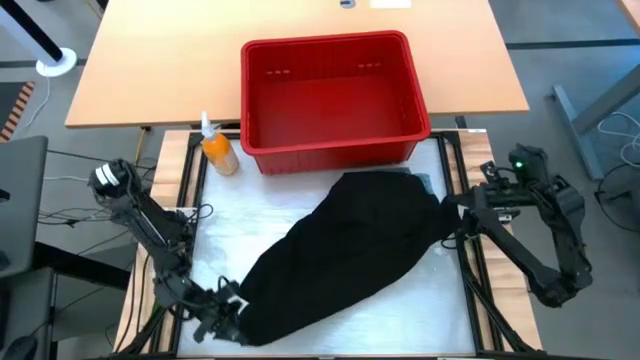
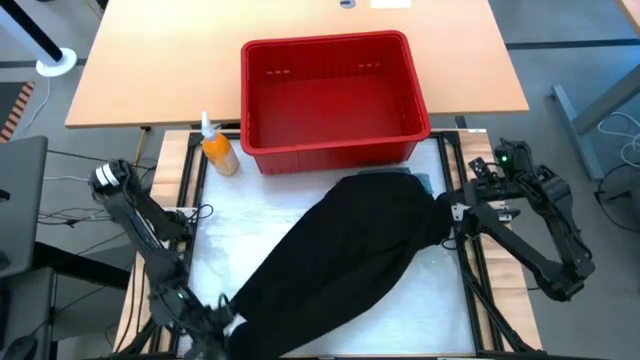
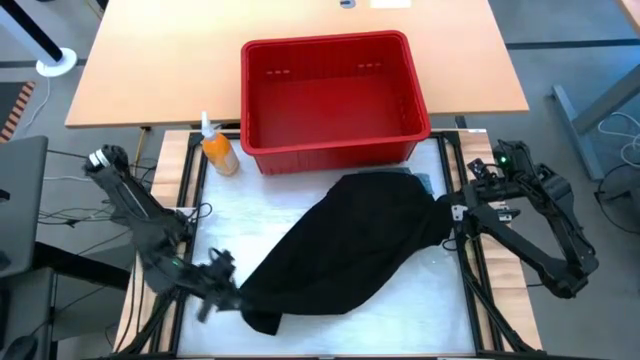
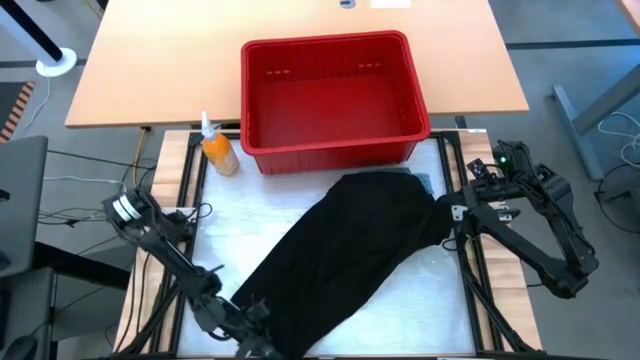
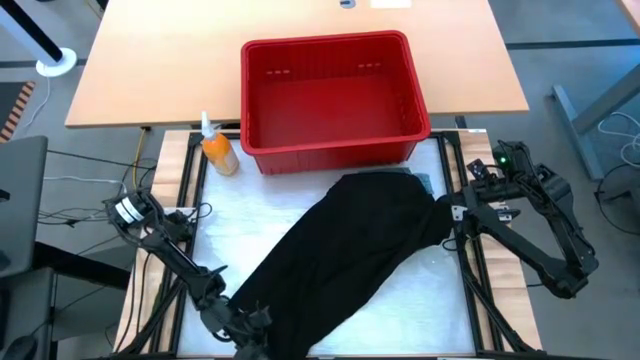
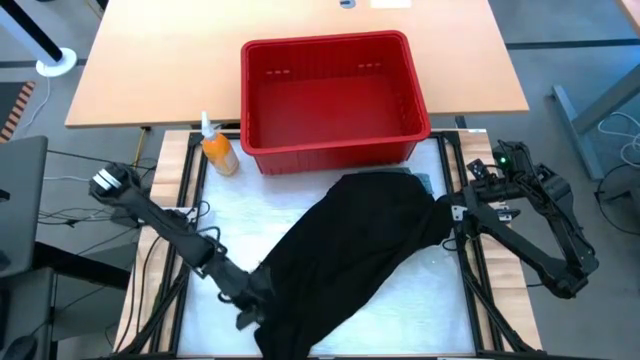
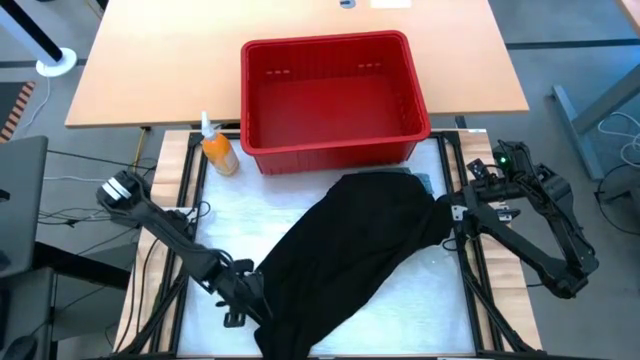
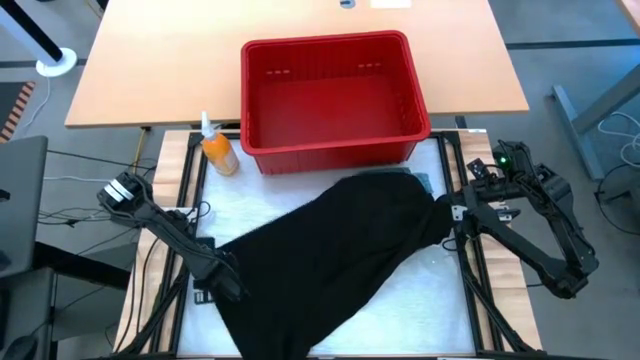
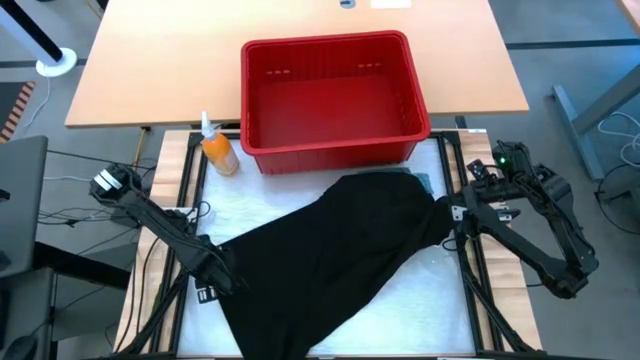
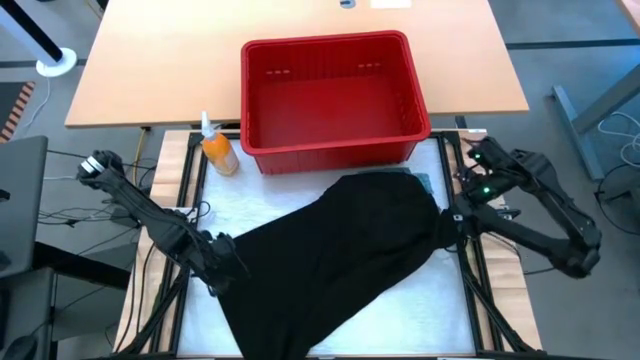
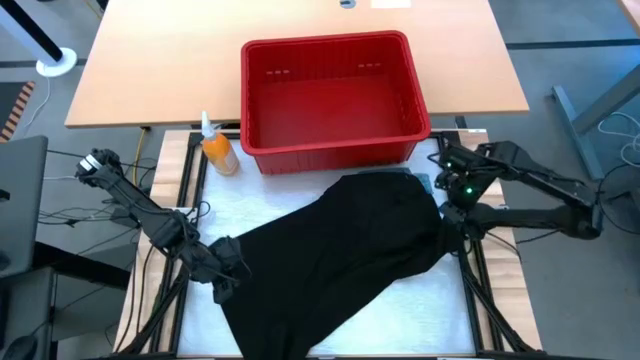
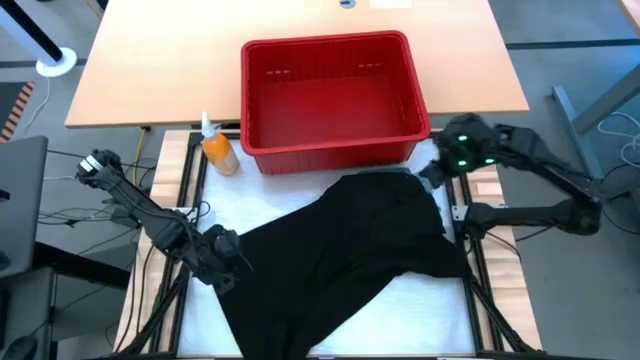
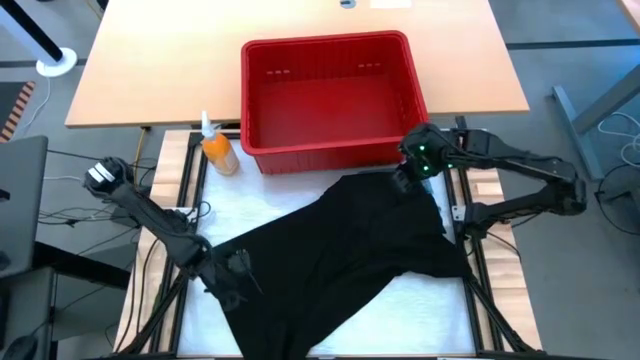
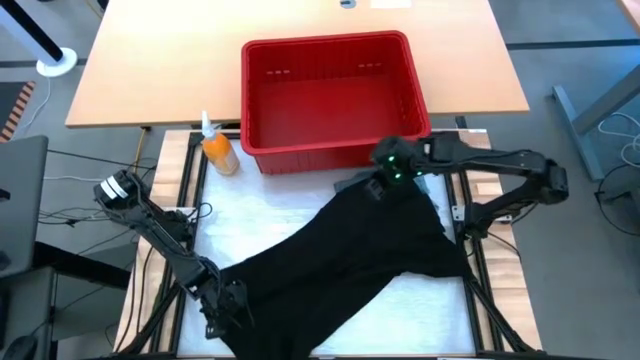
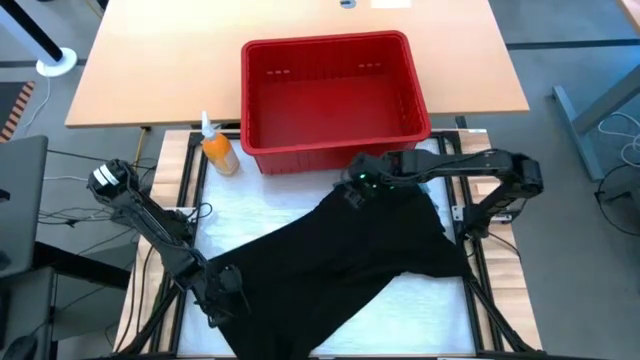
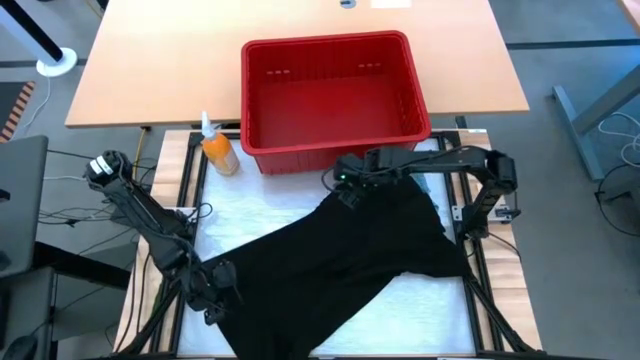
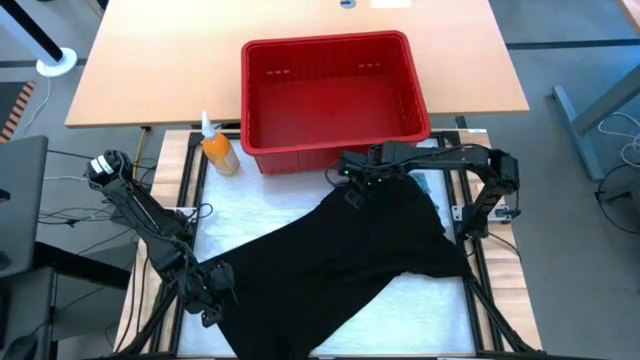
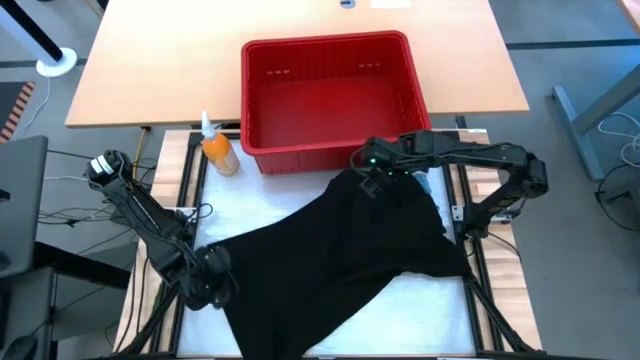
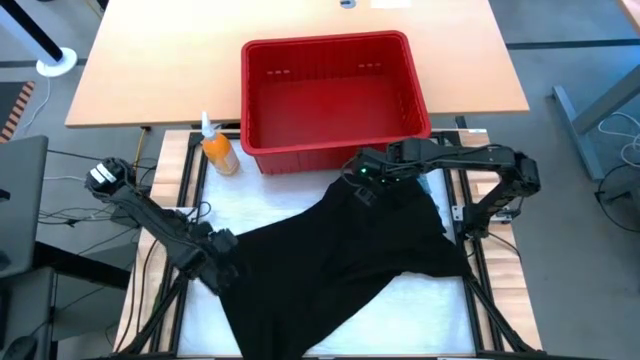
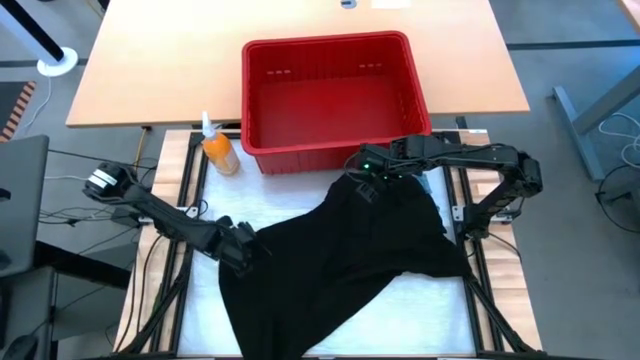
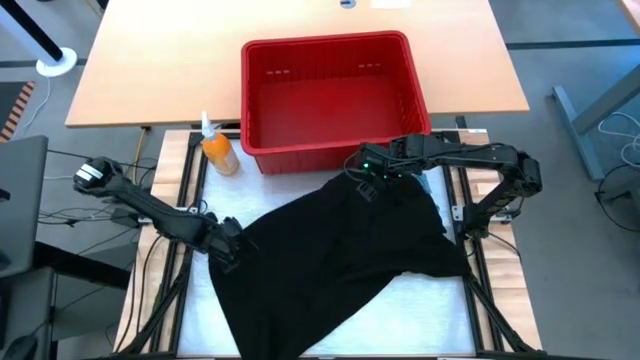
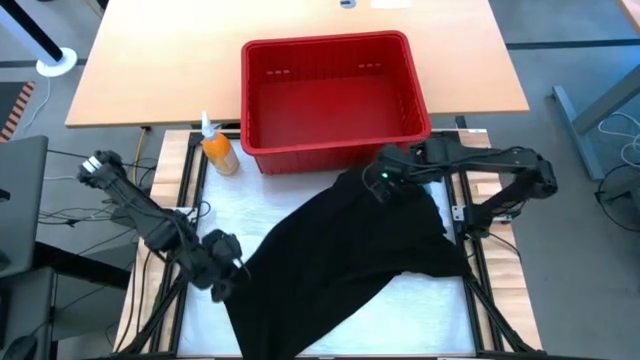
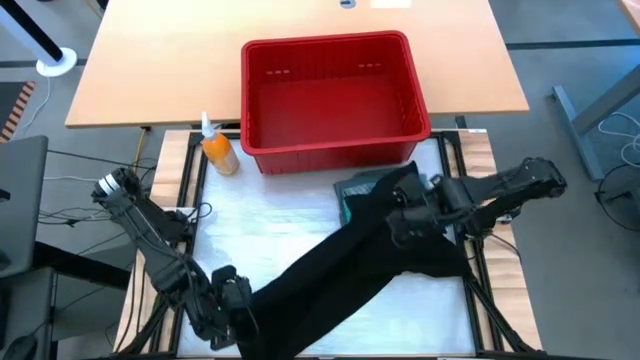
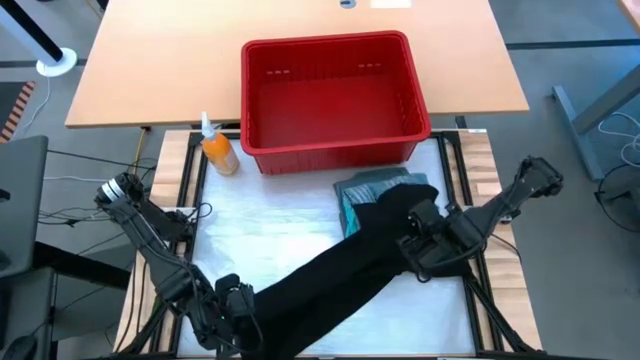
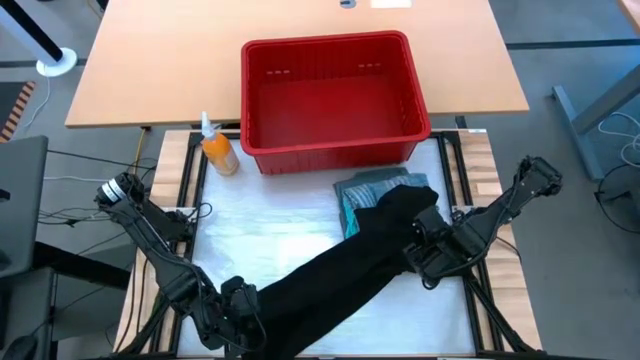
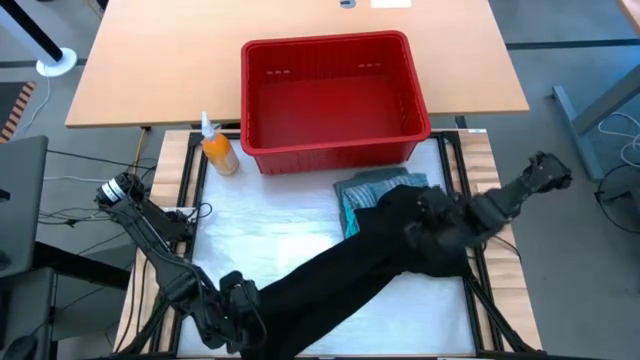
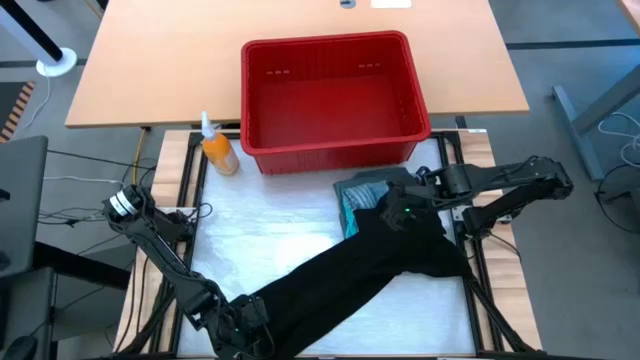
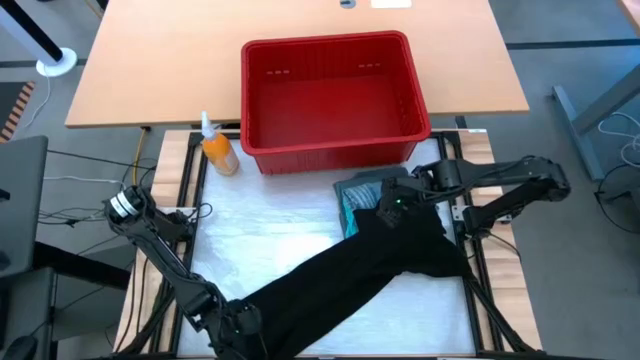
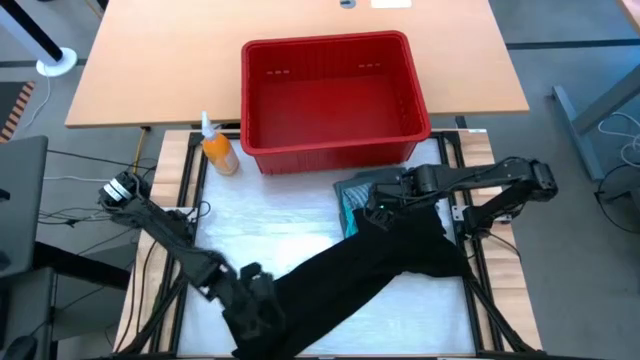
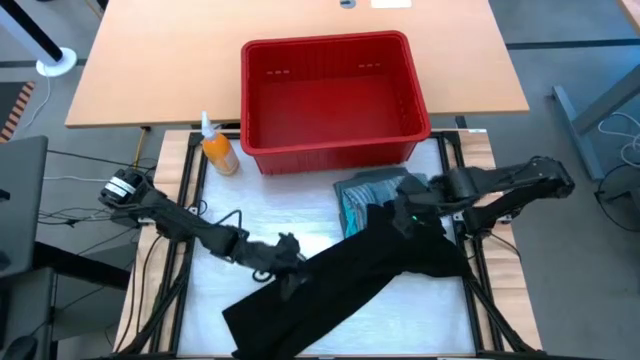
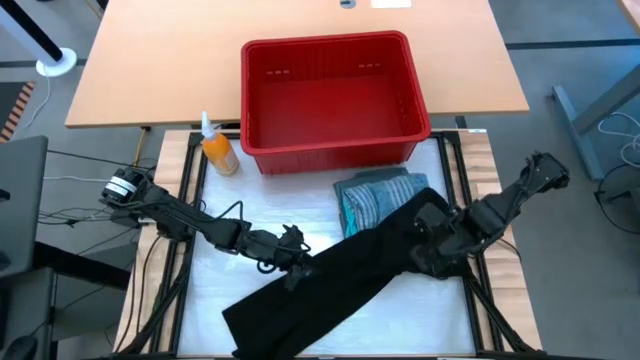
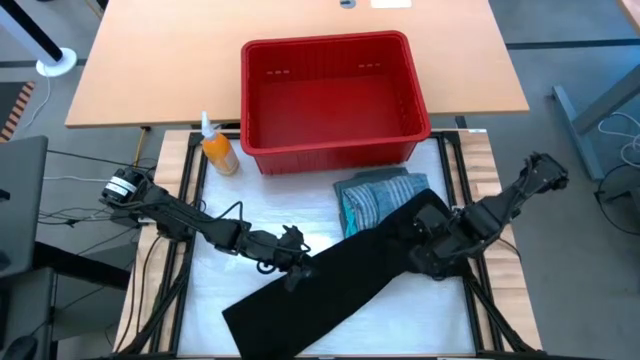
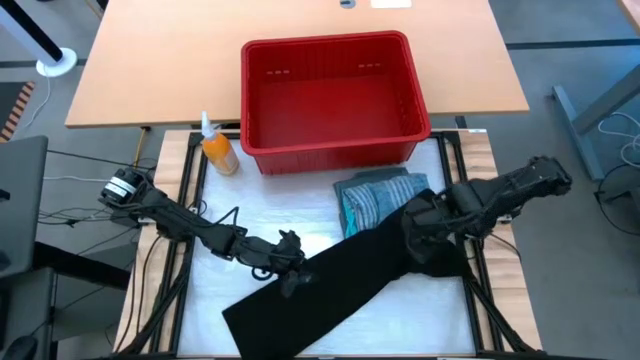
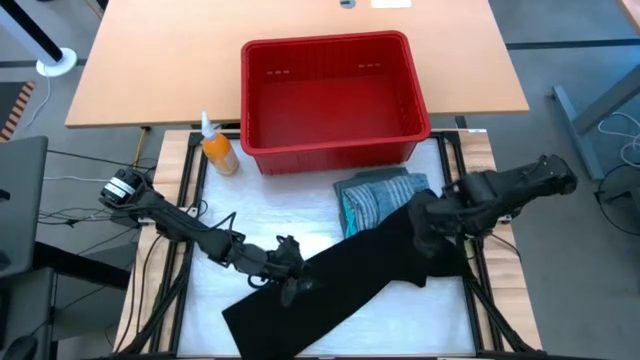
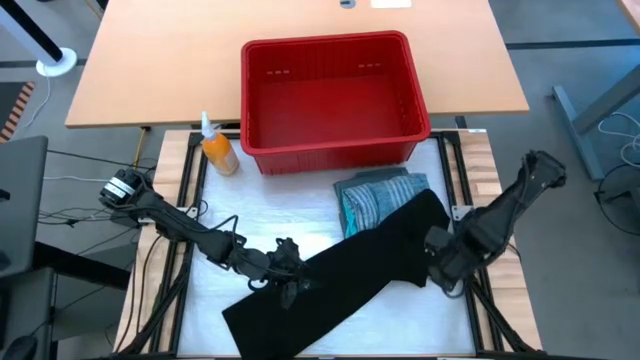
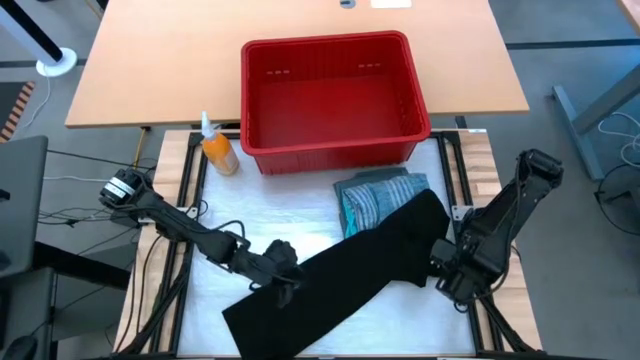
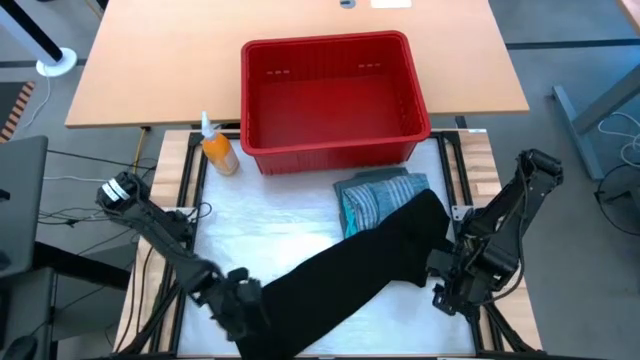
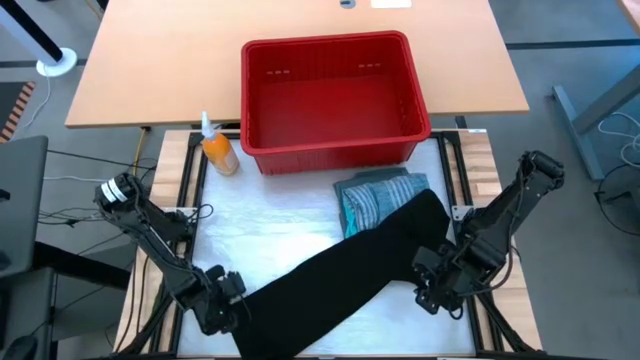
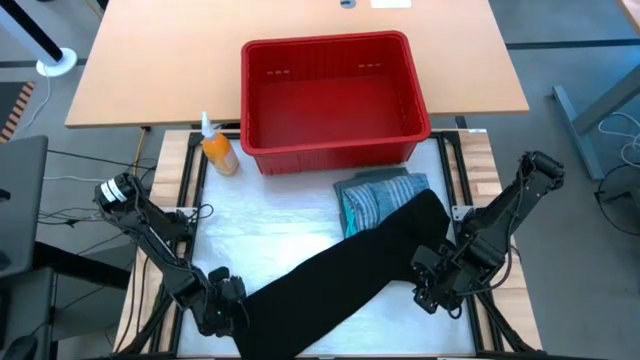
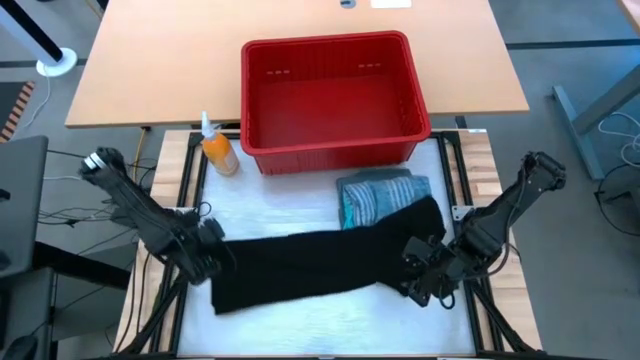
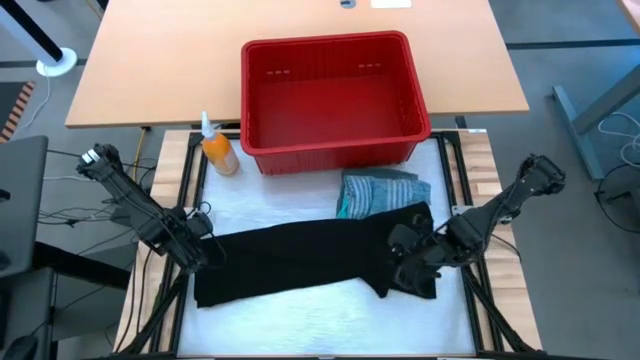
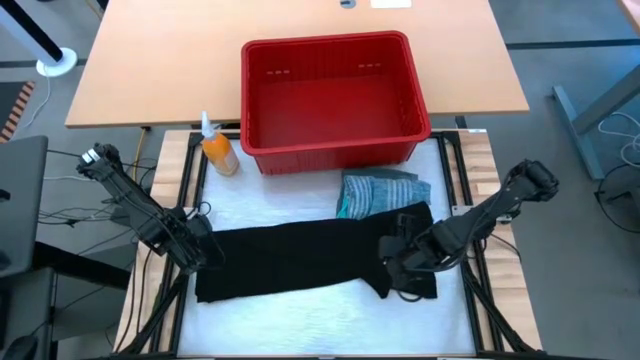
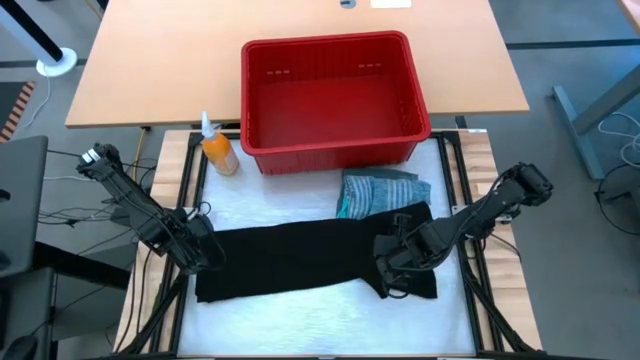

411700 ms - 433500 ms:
Task: Fold Laundry from Bin
Fold the black shirt
